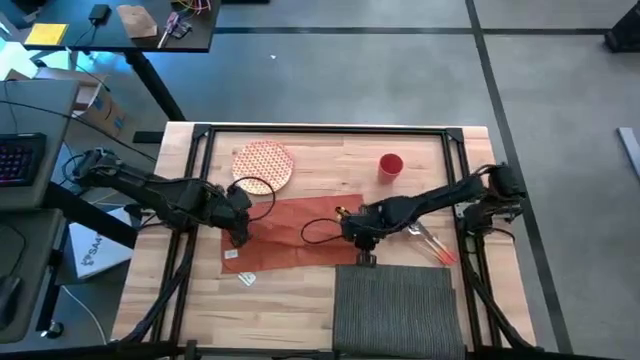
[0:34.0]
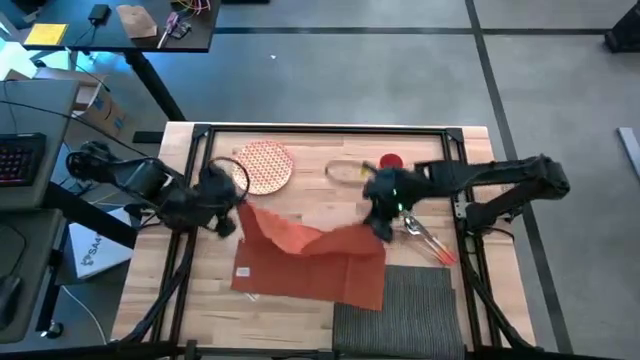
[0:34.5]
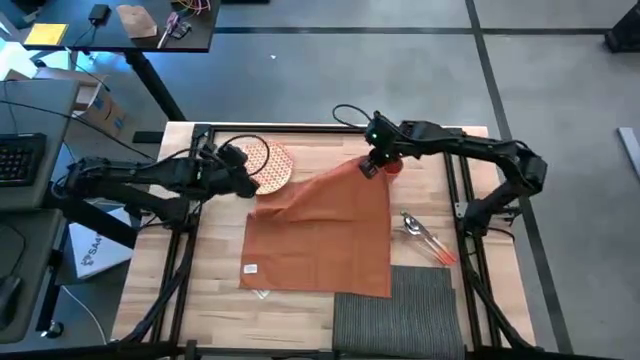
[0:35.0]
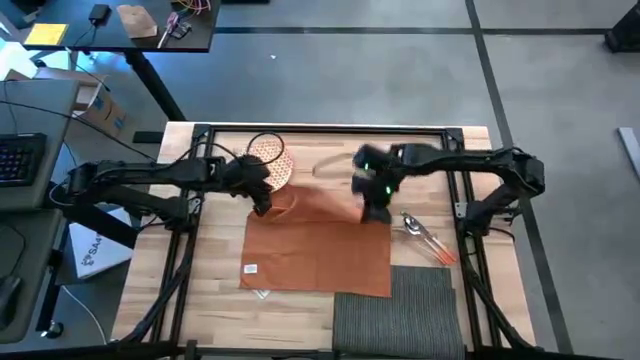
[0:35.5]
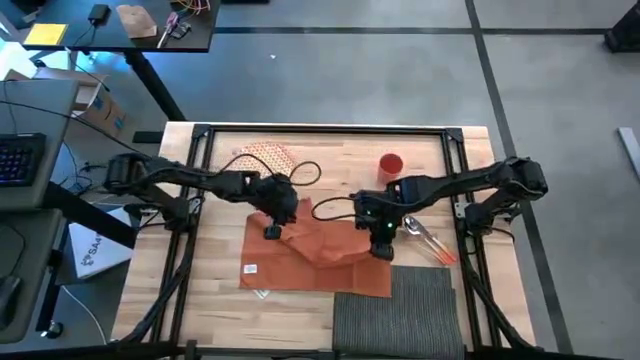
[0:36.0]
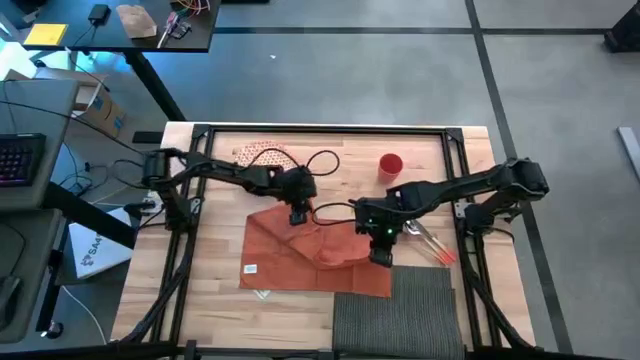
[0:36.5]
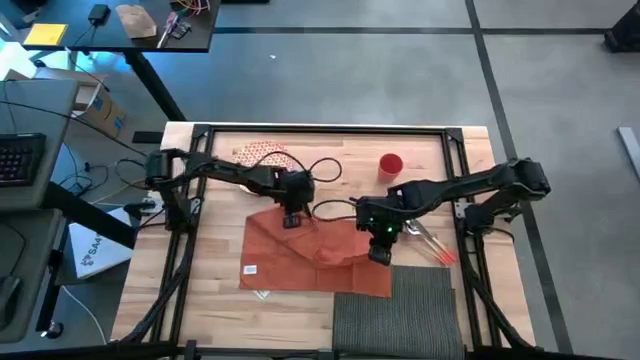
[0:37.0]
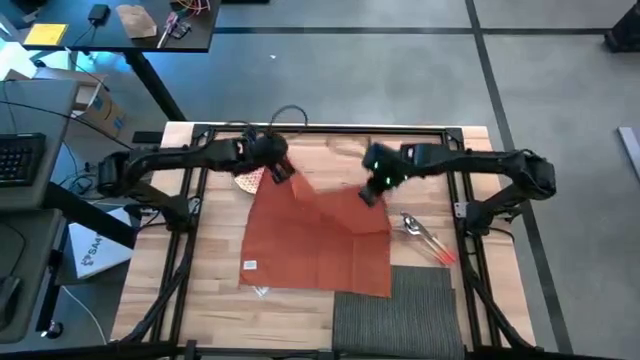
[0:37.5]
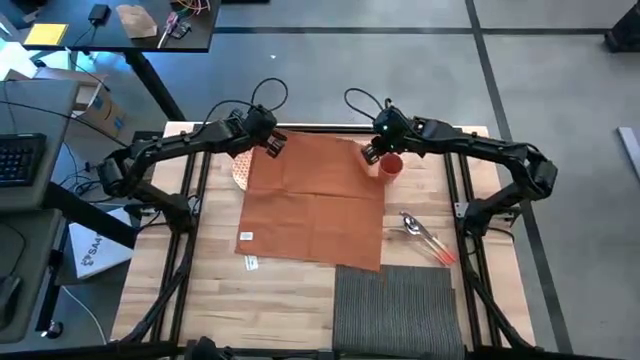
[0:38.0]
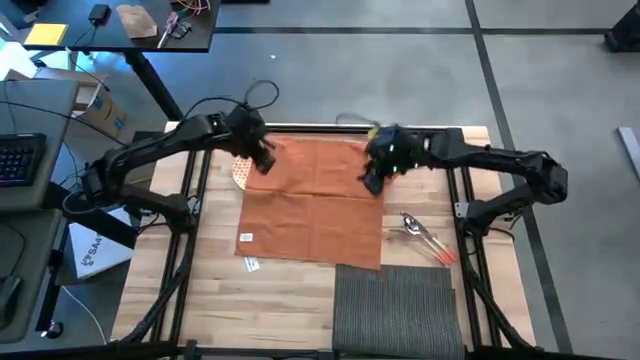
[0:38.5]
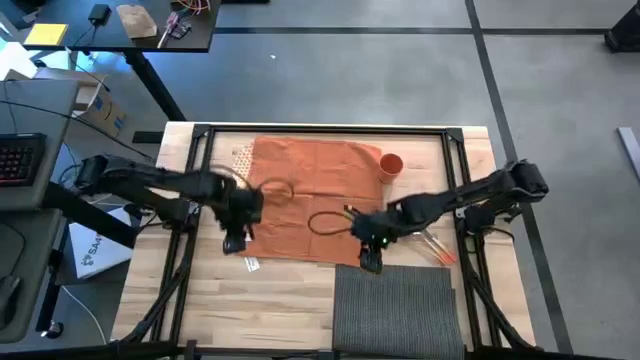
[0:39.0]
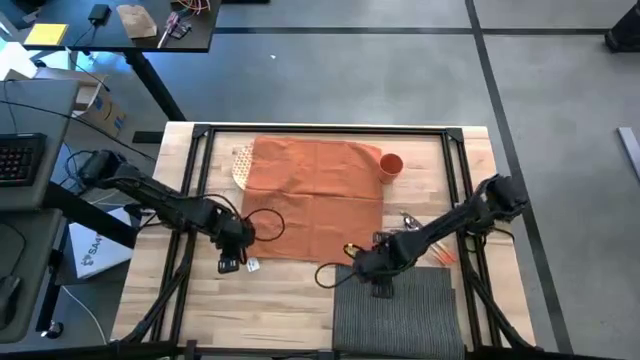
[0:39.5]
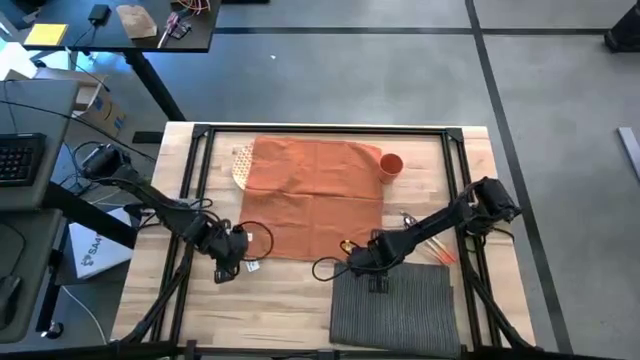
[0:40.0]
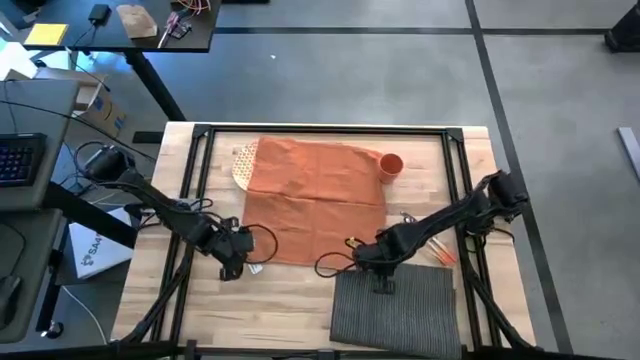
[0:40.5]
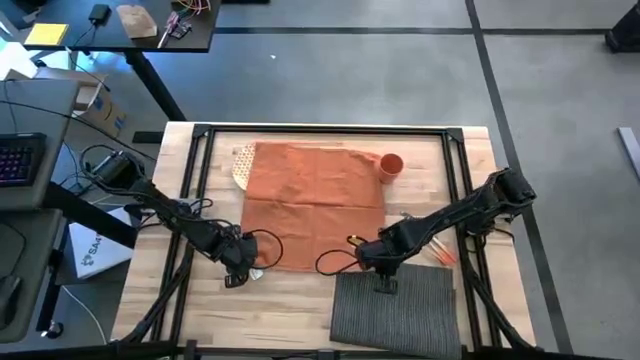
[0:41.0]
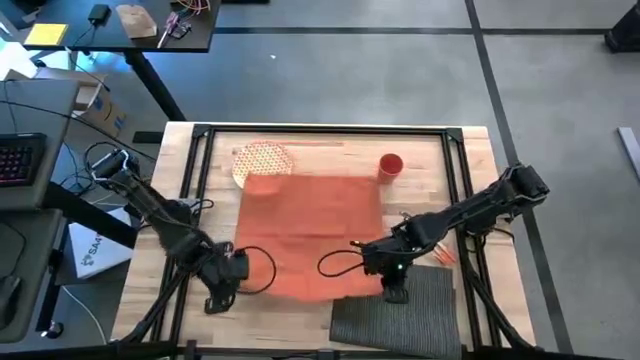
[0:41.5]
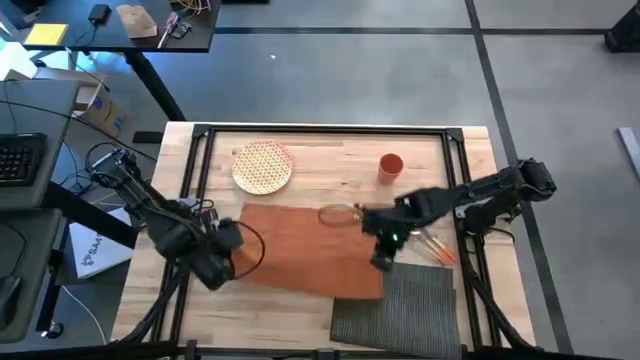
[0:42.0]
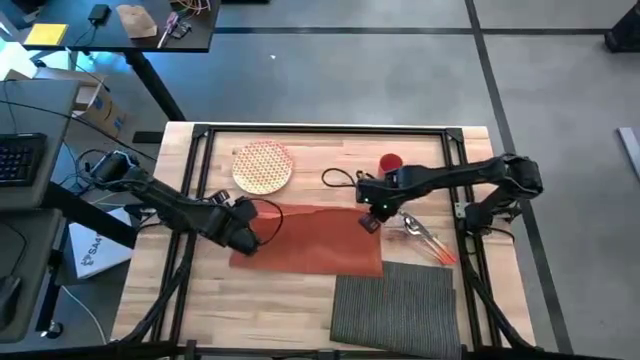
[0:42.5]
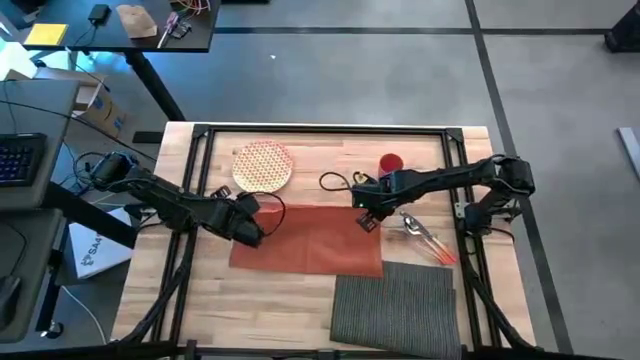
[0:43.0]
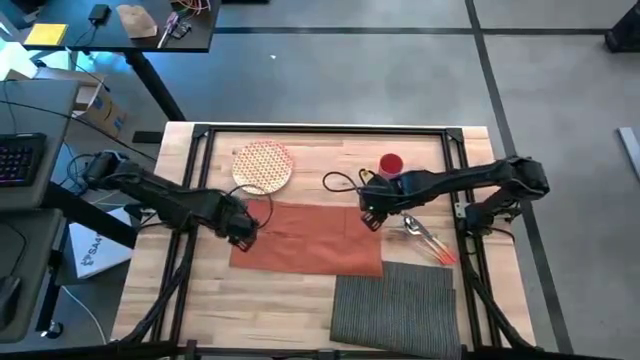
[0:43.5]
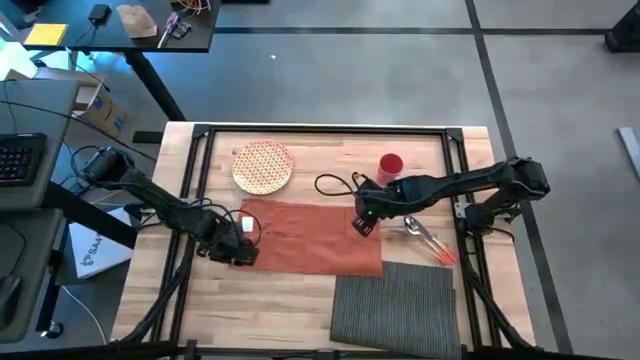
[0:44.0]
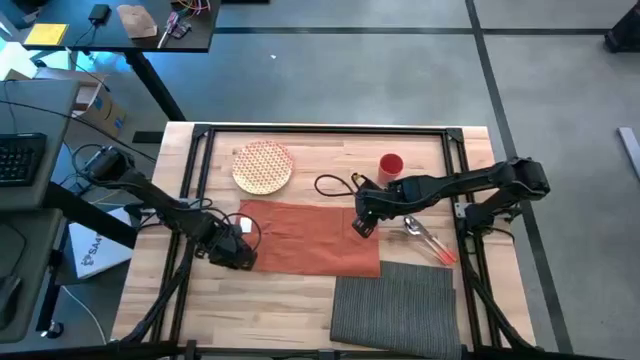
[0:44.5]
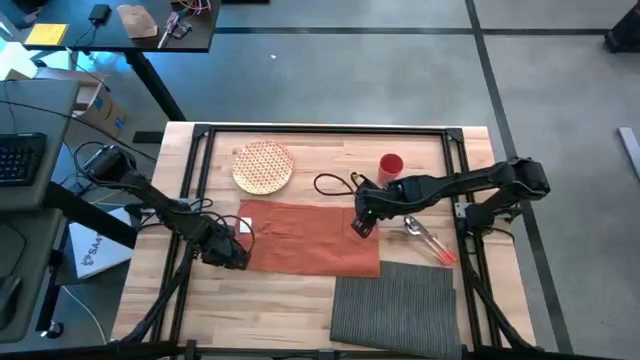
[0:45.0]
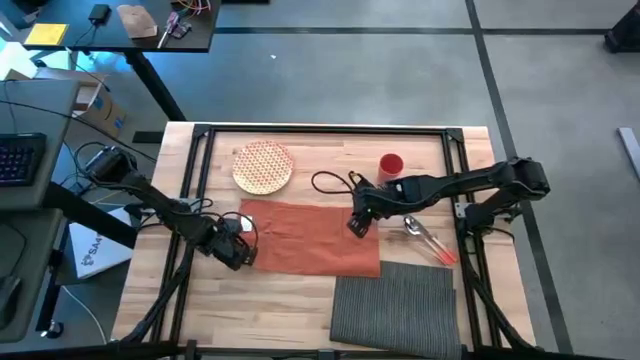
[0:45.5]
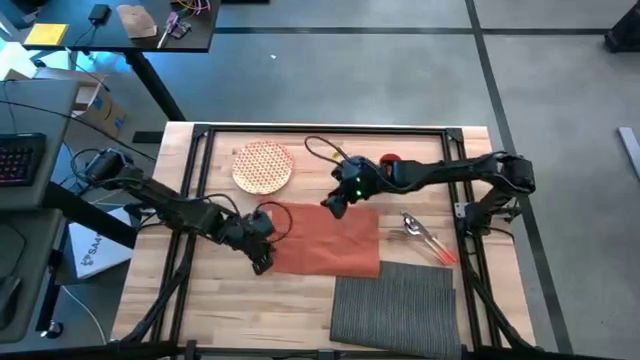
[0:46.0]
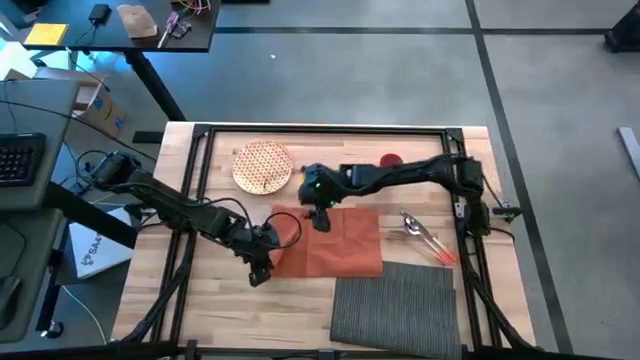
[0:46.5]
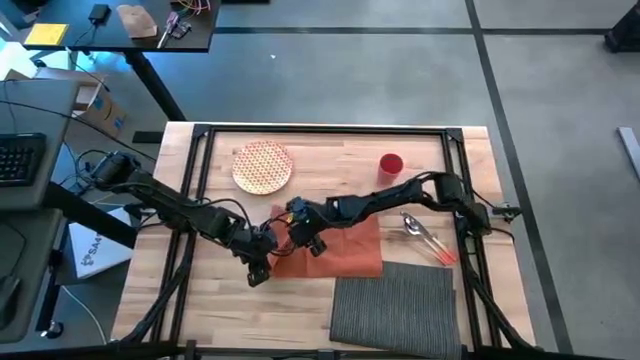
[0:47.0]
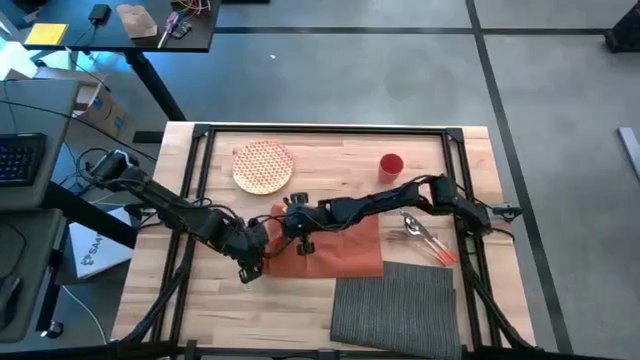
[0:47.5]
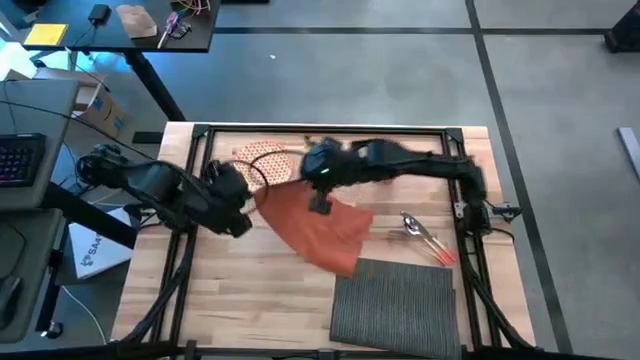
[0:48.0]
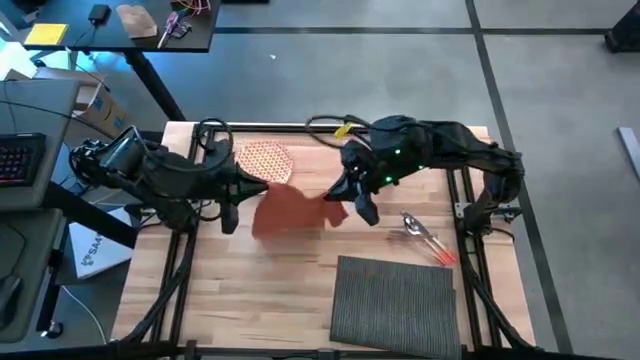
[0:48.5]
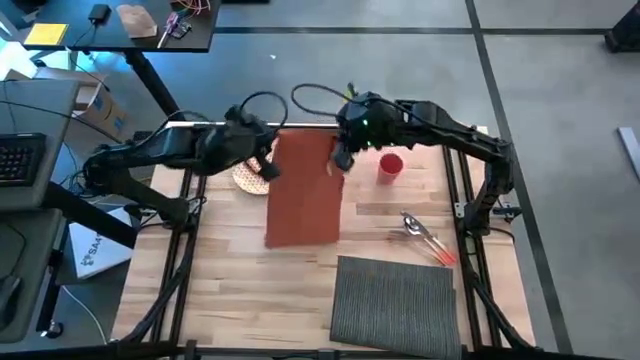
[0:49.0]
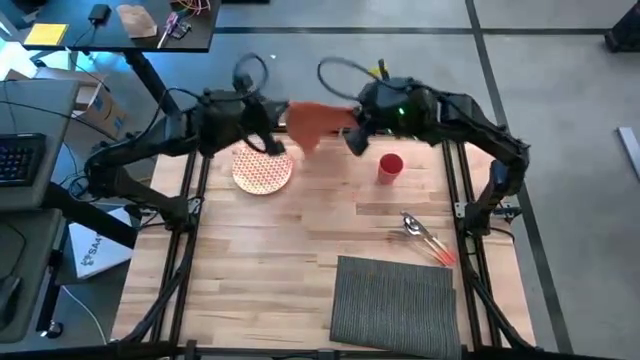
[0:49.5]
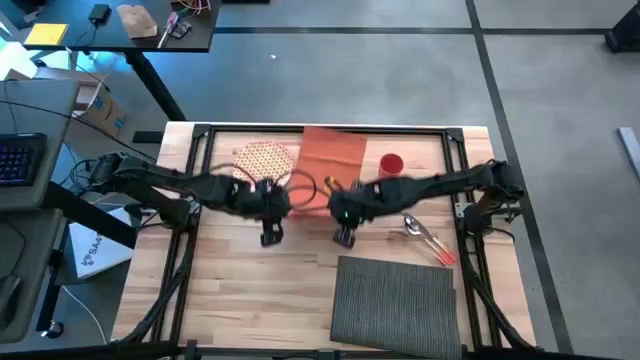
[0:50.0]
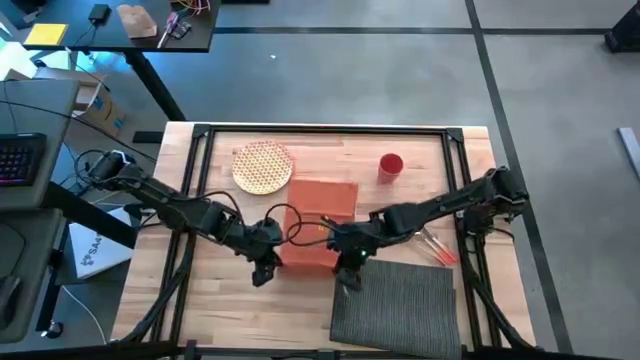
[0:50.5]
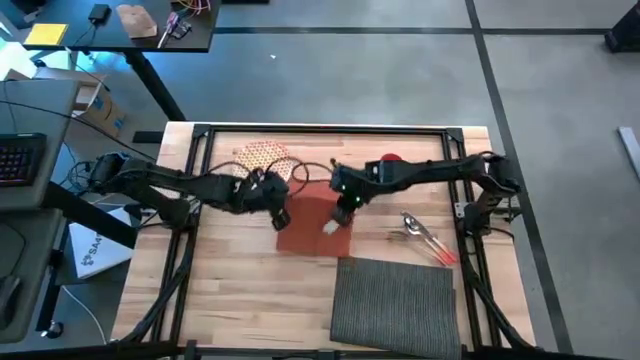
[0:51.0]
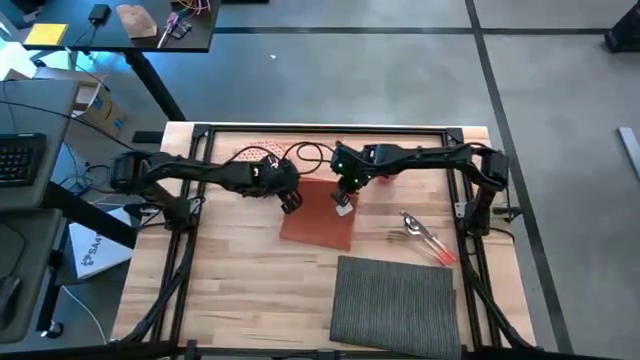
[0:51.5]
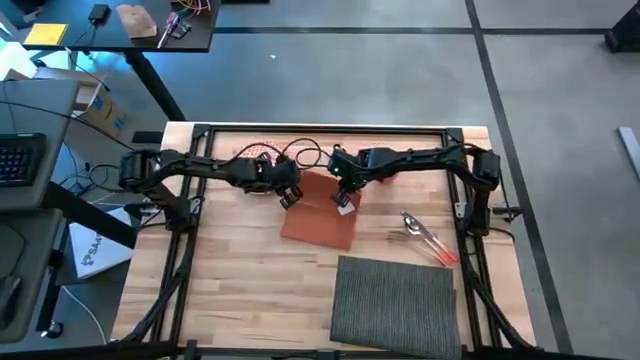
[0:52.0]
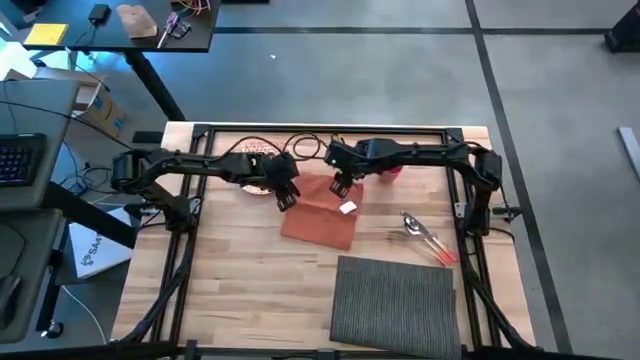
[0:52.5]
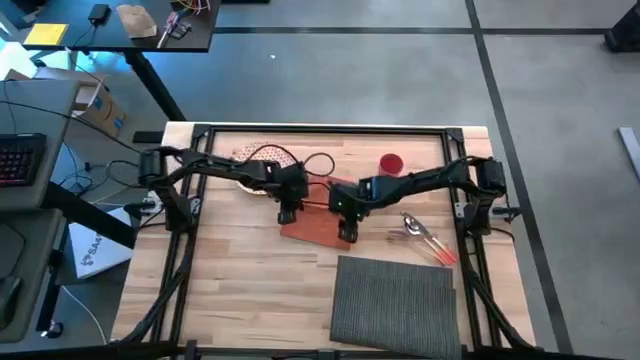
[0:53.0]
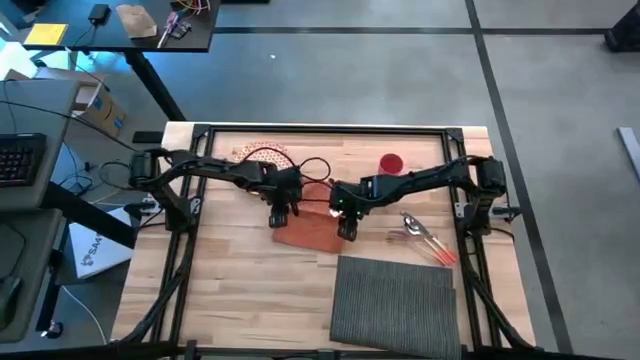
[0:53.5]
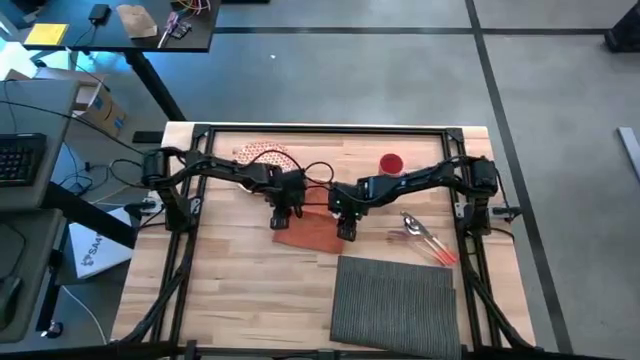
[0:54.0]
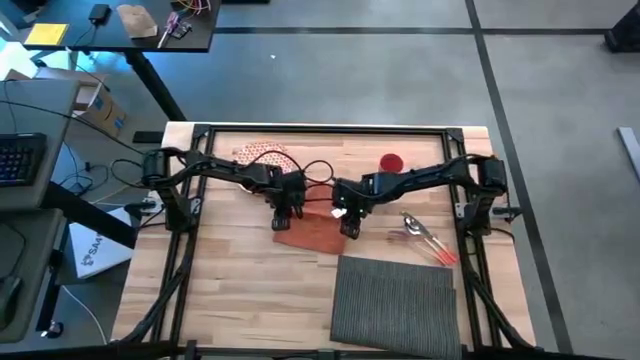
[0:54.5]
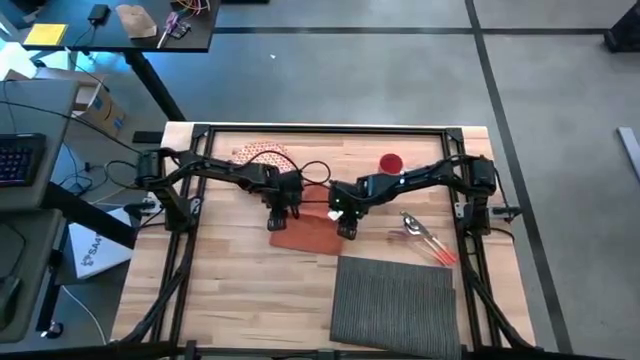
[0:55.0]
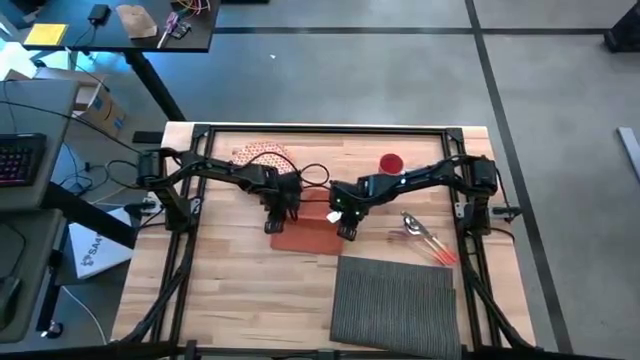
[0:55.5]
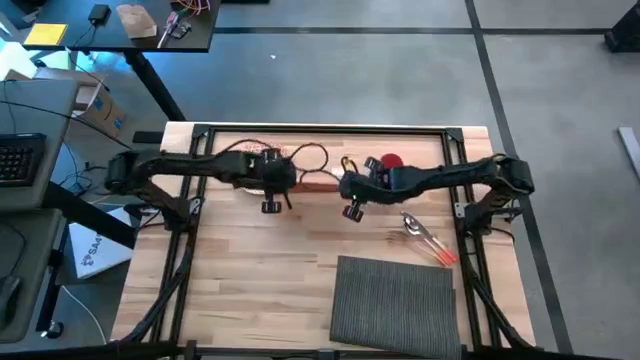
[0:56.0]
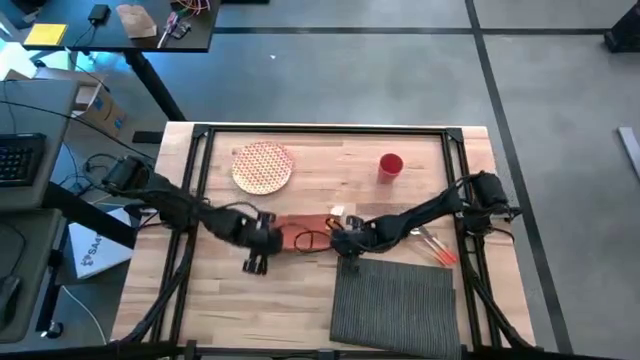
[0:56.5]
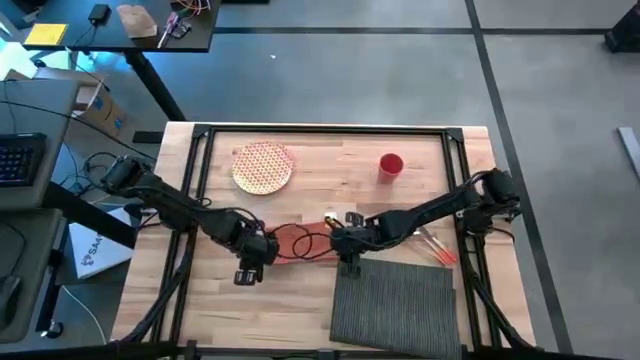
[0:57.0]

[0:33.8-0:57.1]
Task: Set table place
Fold the orange table napkin
